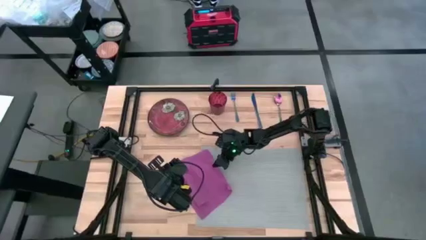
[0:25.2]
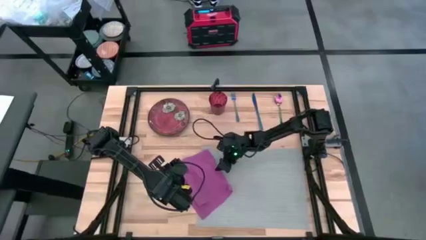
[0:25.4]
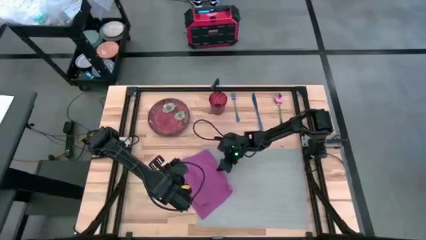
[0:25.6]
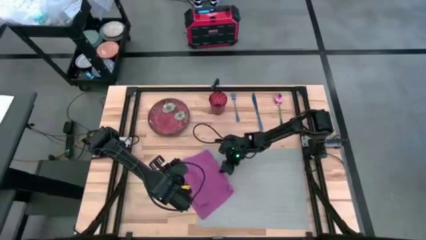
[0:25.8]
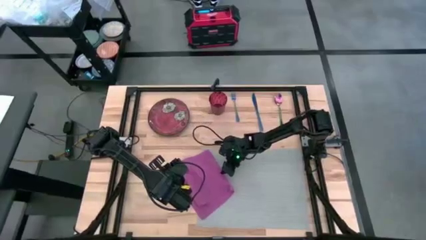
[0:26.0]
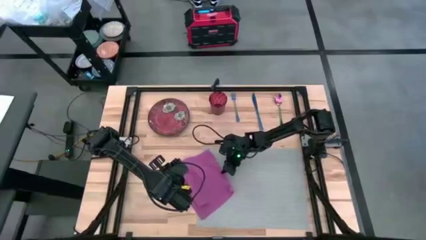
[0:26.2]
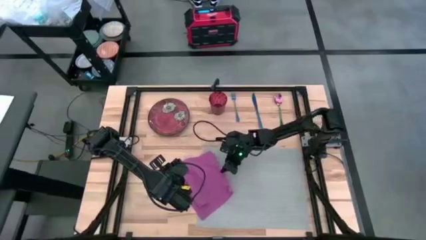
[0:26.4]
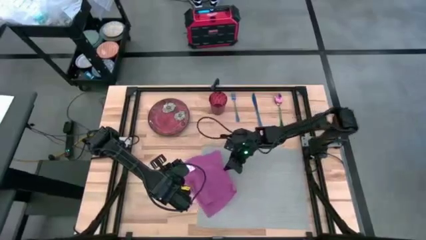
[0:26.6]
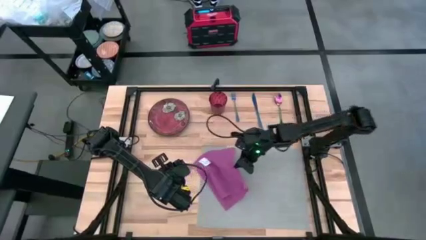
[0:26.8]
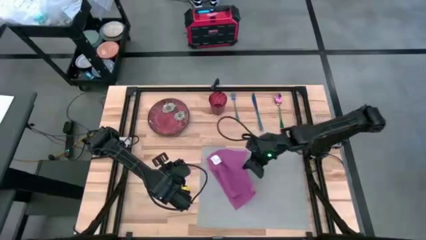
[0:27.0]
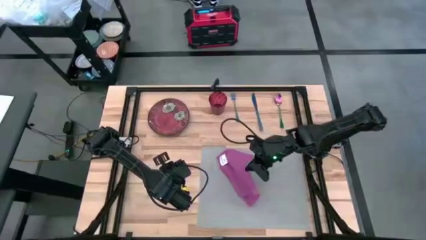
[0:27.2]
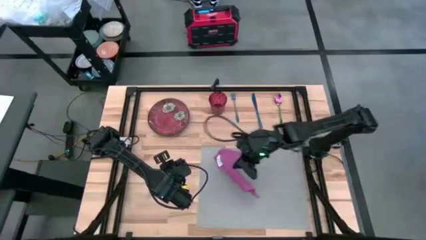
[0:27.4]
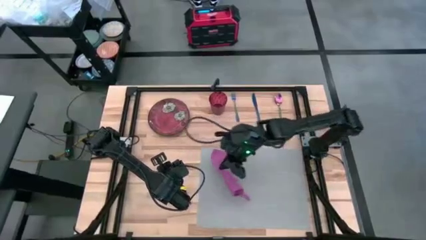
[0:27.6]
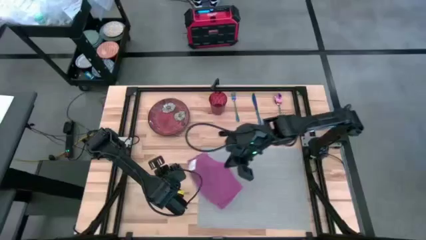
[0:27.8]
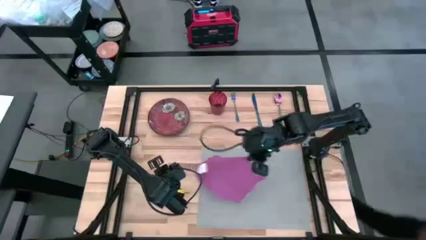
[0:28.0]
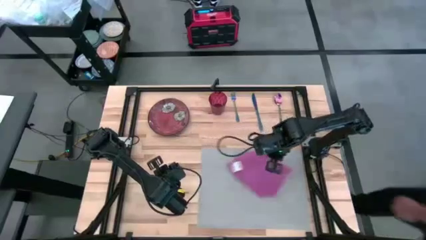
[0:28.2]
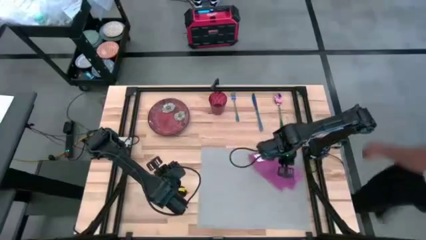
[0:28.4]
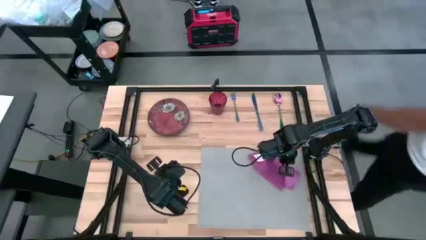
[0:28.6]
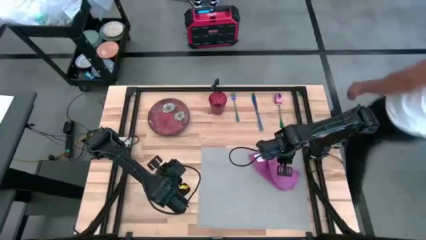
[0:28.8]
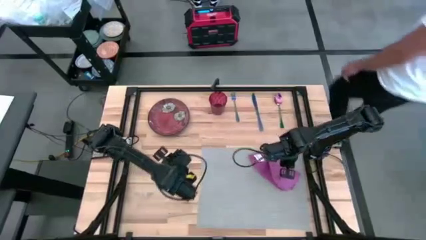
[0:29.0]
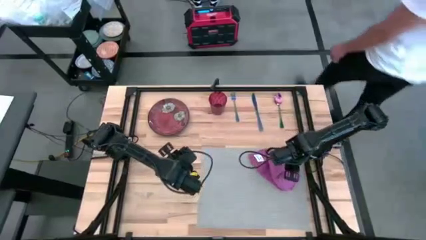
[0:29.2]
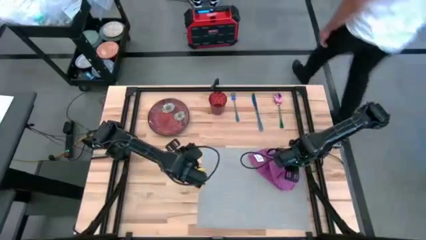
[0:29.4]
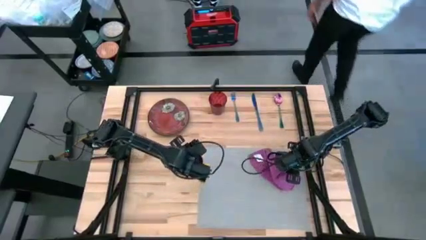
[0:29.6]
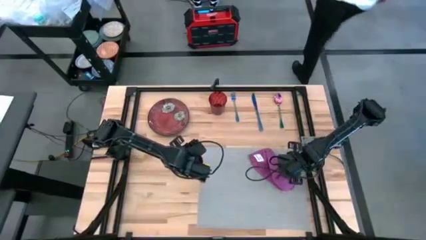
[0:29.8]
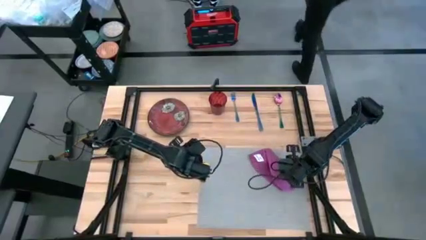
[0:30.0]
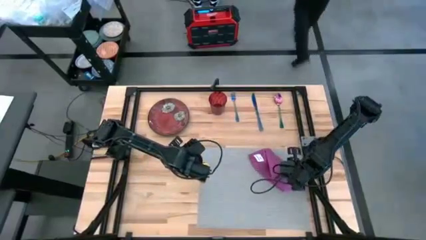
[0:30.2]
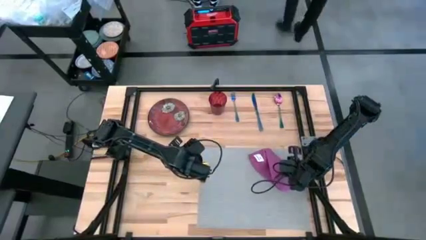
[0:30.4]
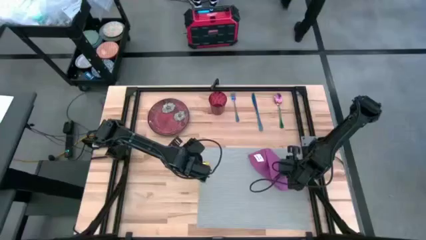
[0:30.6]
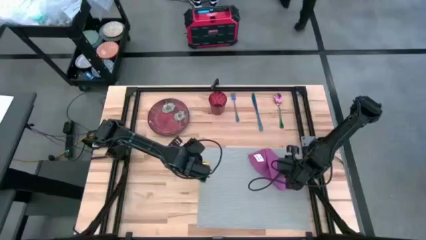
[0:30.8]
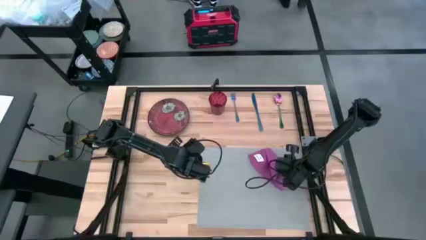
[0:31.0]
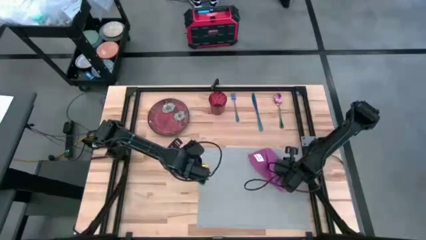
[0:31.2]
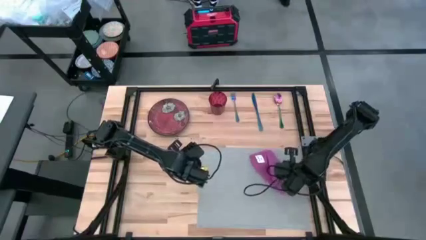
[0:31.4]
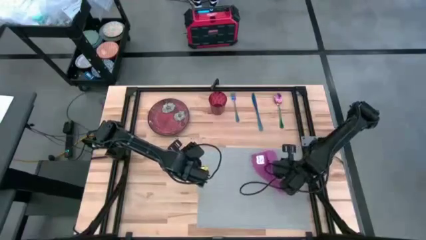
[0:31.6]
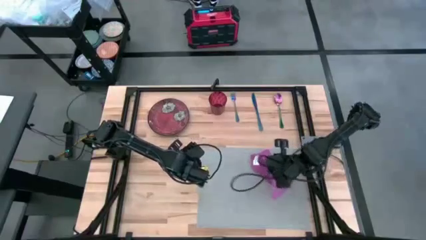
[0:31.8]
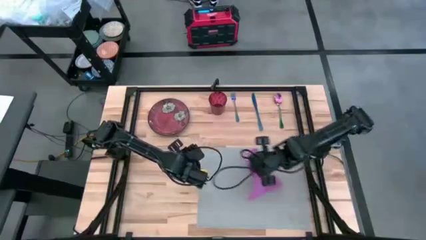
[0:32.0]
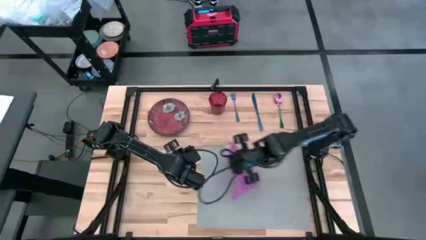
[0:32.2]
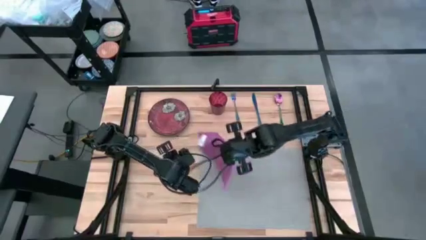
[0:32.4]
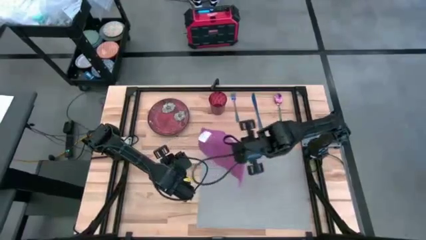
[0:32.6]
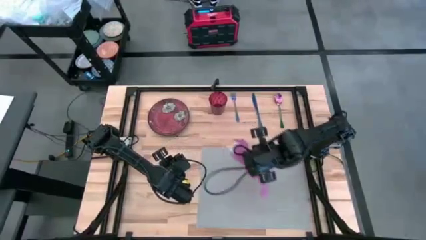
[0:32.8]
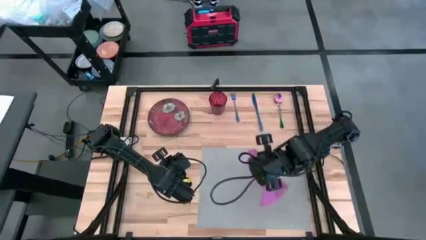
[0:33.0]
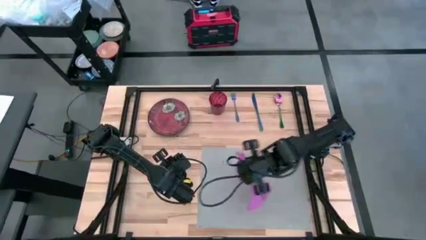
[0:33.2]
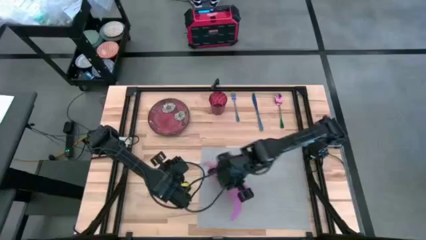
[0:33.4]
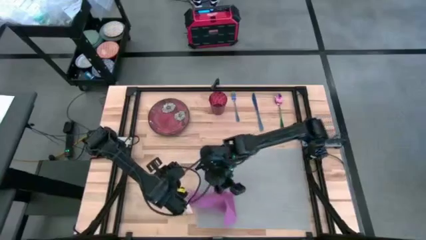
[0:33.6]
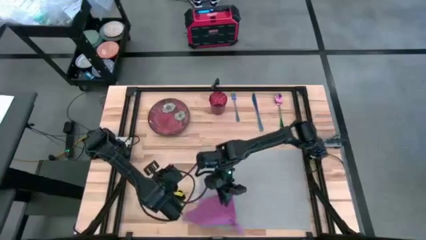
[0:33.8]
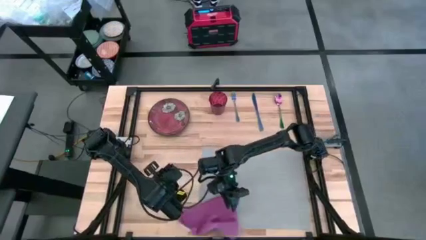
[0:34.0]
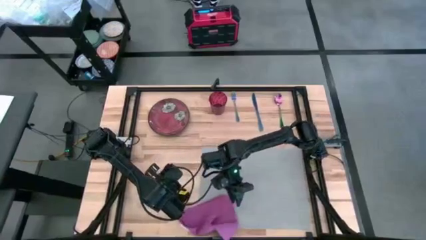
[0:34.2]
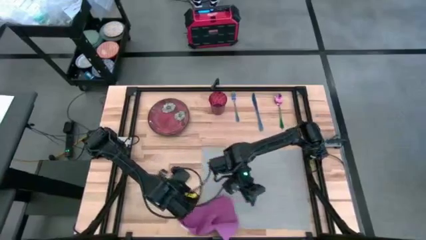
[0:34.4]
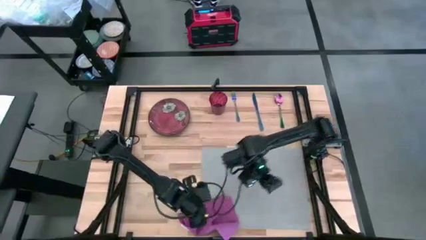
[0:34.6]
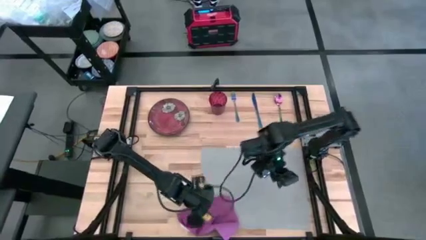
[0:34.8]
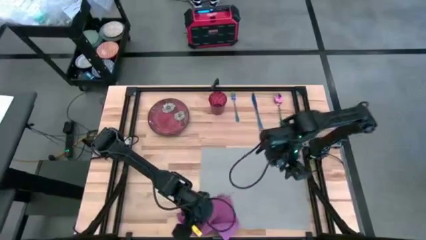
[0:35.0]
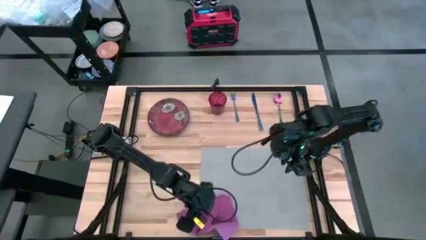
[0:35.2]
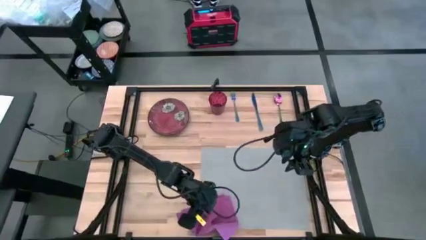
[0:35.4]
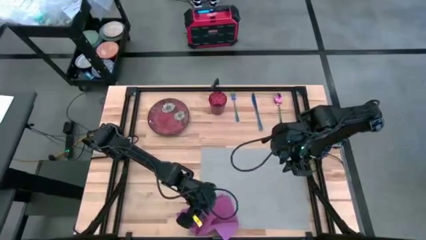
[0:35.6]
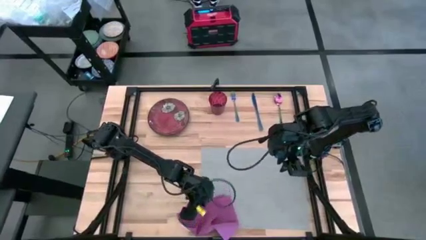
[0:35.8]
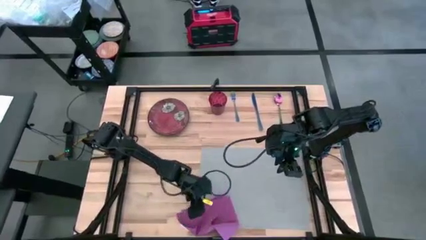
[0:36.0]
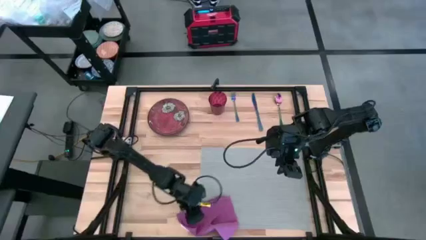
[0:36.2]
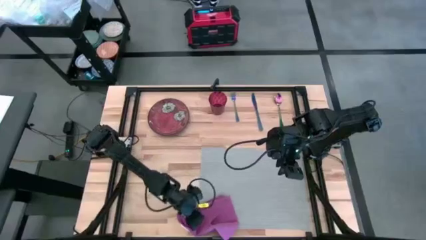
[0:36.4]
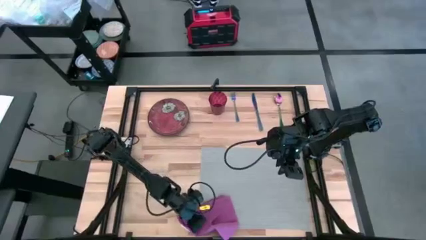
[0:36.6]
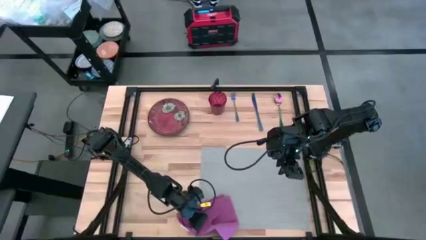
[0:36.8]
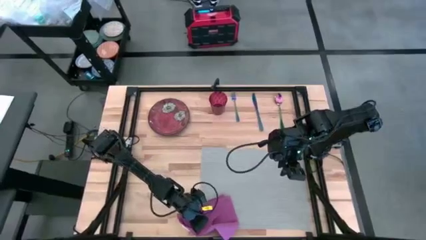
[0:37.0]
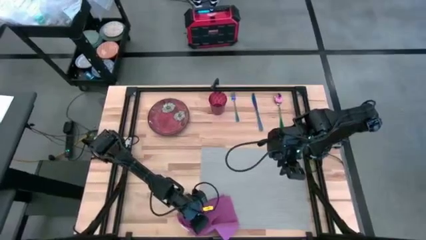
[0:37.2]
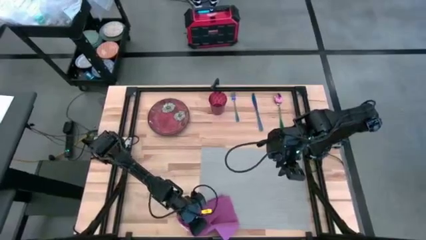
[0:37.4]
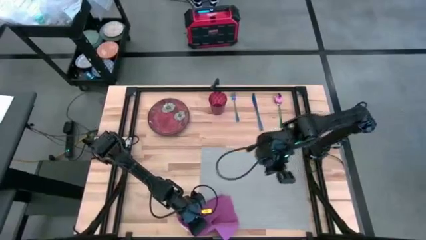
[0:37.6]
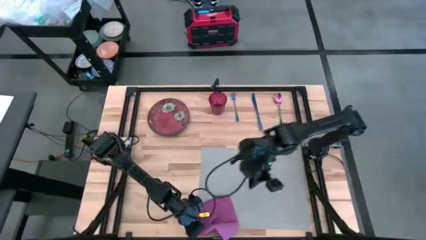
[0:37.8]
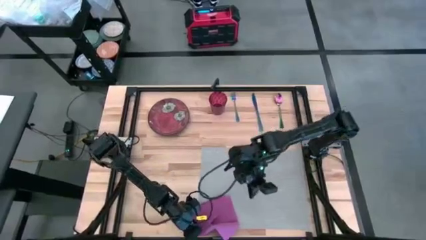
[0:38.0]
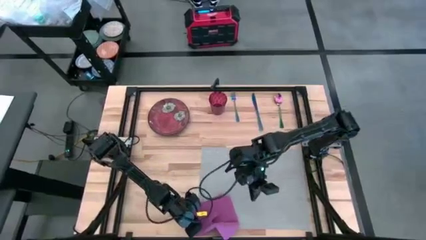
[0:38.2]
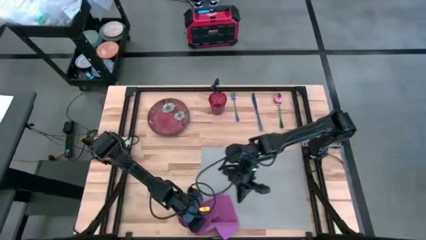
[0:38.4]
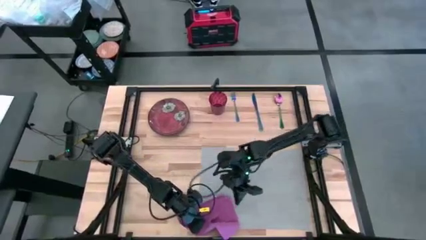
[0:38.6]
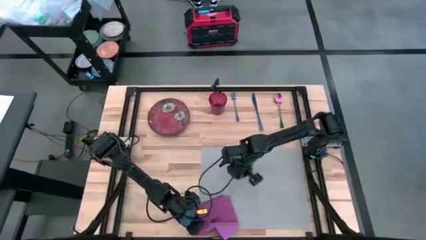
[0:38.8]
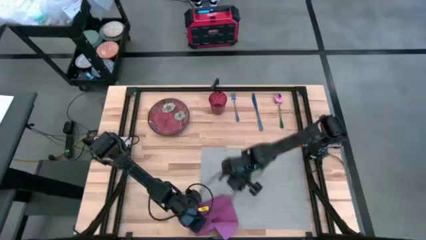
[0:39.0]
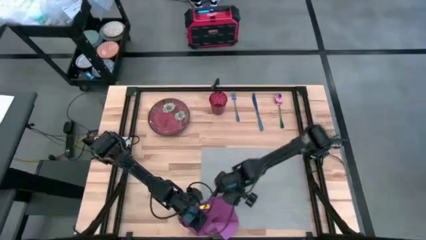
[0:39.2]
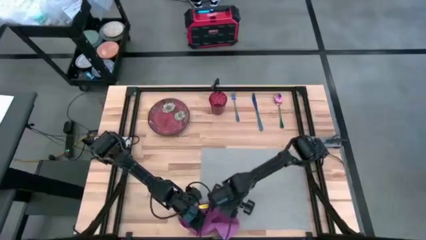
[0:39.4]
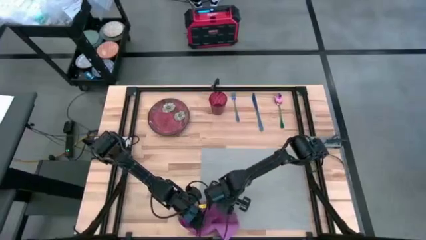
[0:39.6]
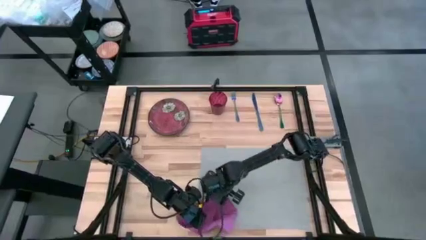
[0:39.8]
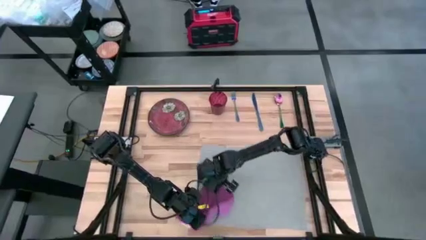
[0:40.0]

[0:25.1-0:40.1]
Task: Set table place
Fold the purple napkin
